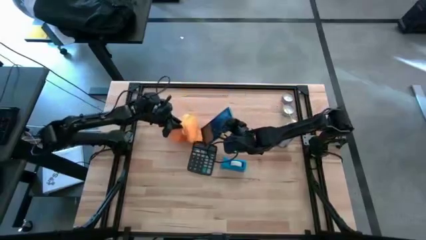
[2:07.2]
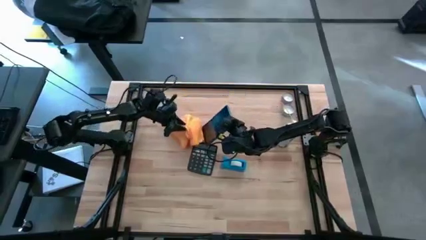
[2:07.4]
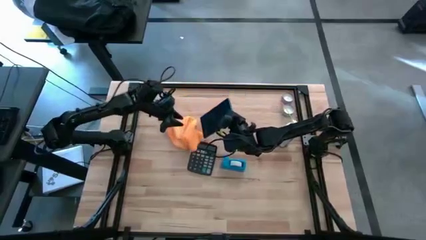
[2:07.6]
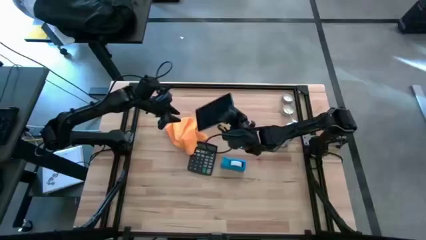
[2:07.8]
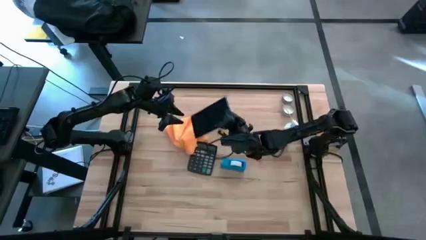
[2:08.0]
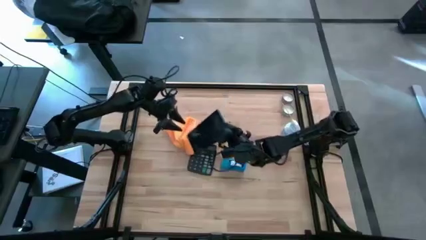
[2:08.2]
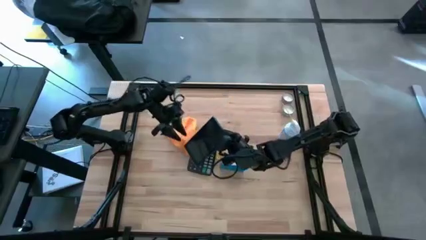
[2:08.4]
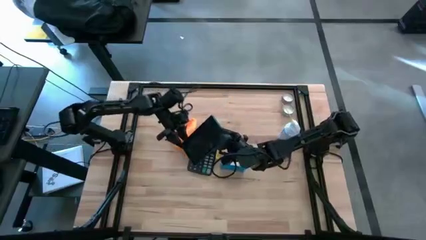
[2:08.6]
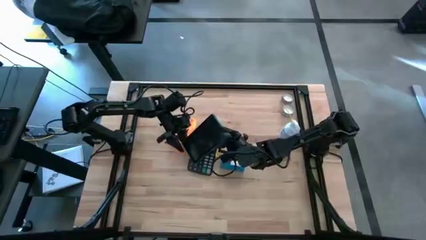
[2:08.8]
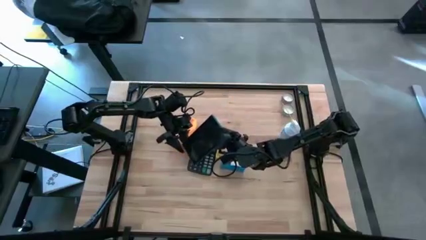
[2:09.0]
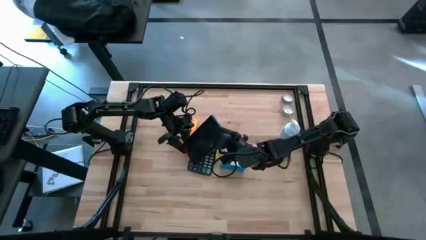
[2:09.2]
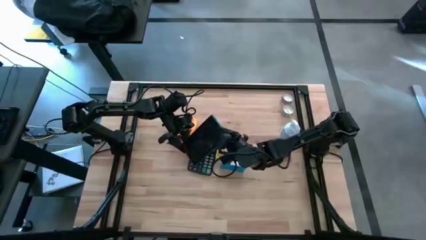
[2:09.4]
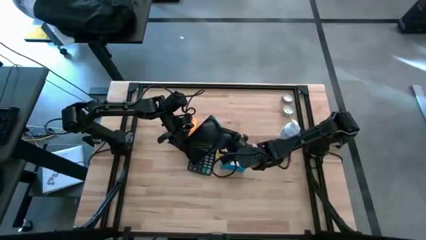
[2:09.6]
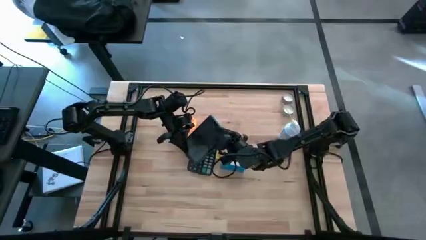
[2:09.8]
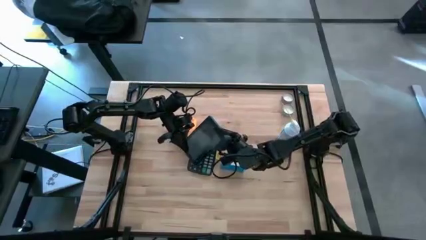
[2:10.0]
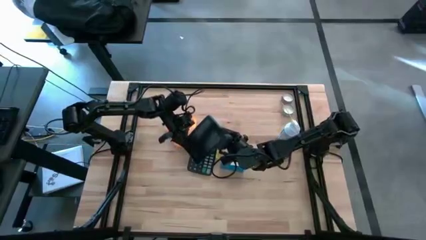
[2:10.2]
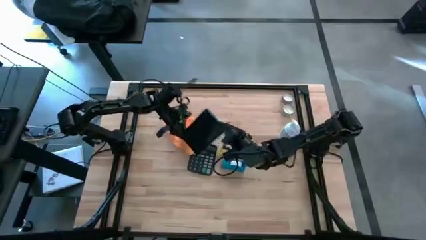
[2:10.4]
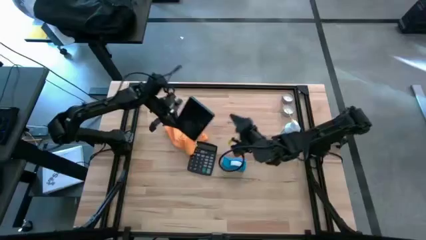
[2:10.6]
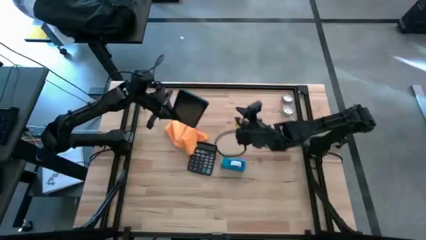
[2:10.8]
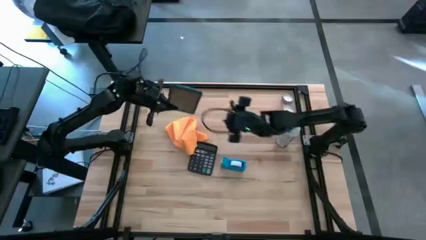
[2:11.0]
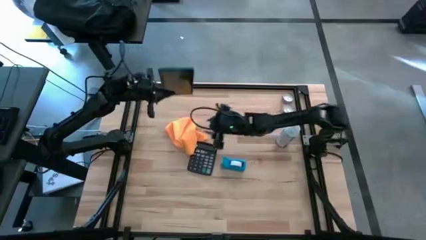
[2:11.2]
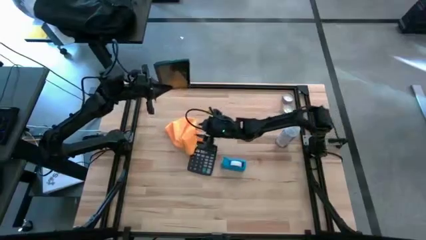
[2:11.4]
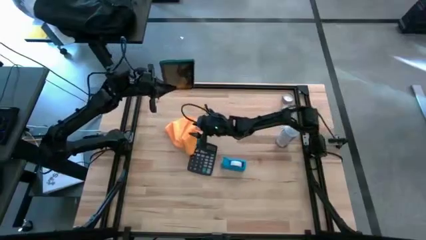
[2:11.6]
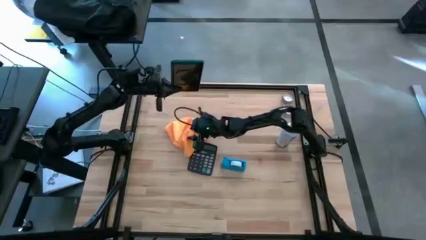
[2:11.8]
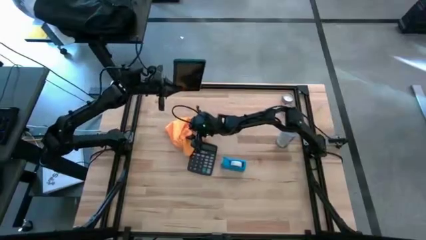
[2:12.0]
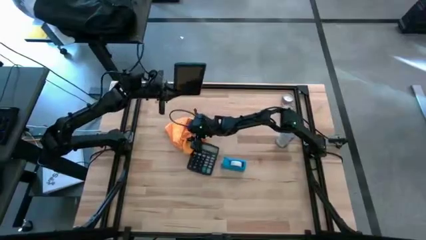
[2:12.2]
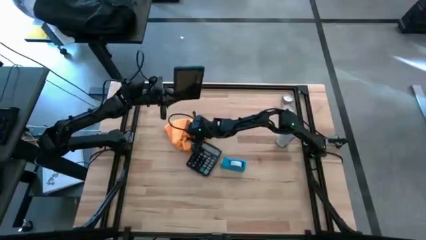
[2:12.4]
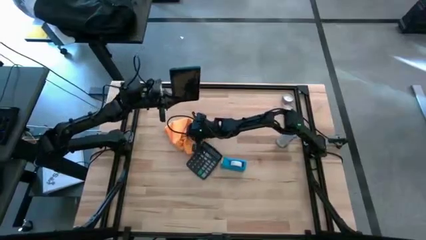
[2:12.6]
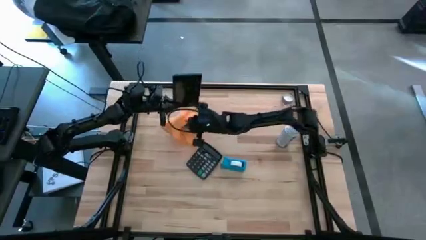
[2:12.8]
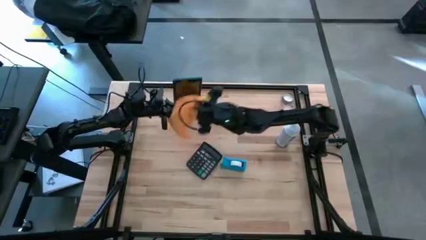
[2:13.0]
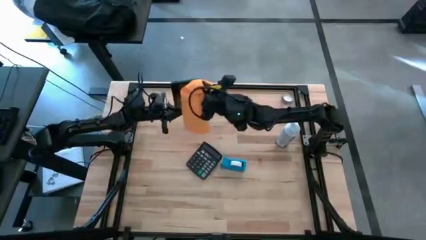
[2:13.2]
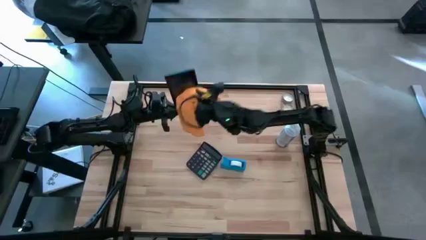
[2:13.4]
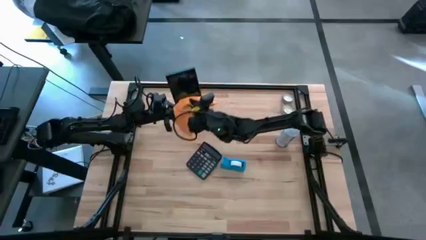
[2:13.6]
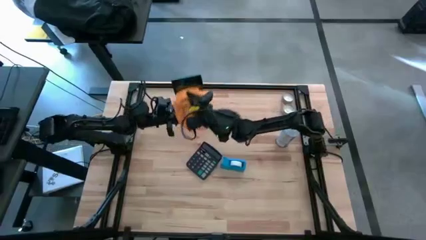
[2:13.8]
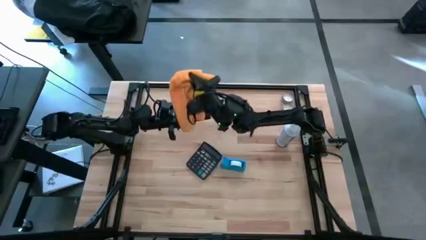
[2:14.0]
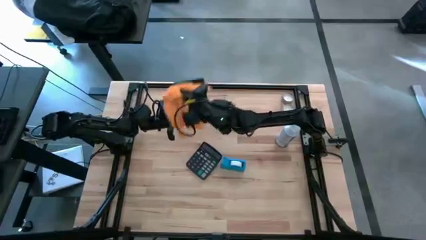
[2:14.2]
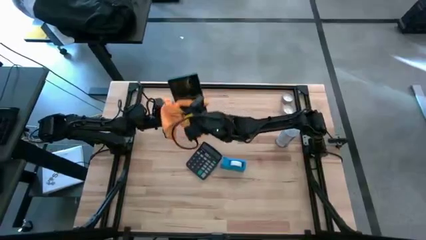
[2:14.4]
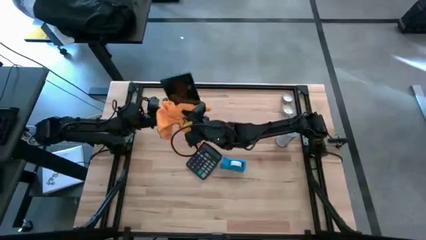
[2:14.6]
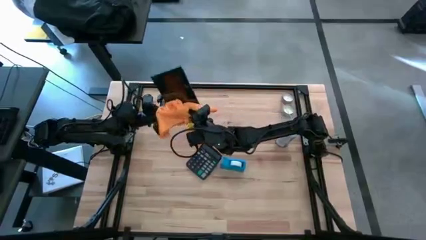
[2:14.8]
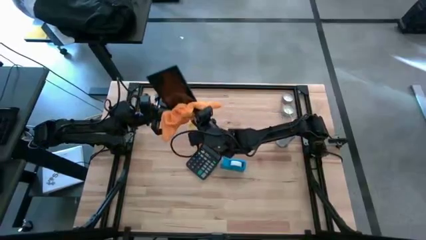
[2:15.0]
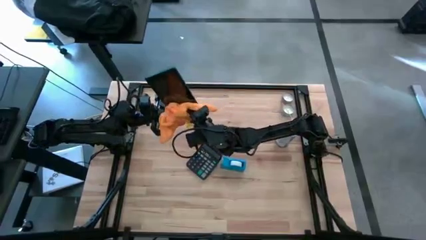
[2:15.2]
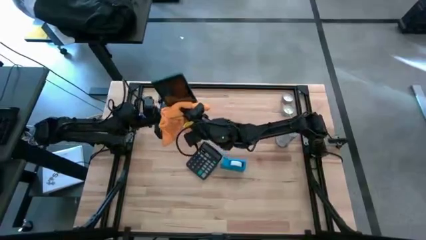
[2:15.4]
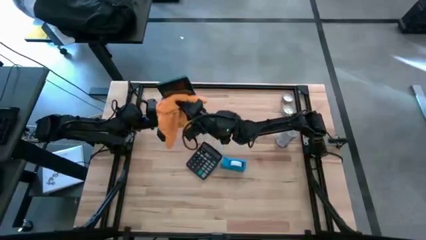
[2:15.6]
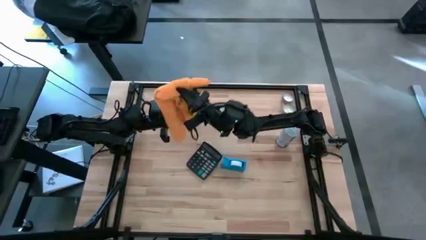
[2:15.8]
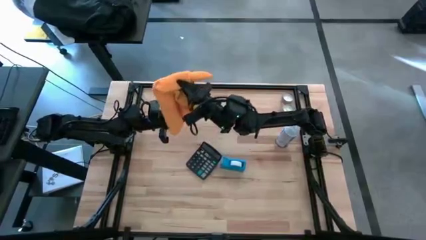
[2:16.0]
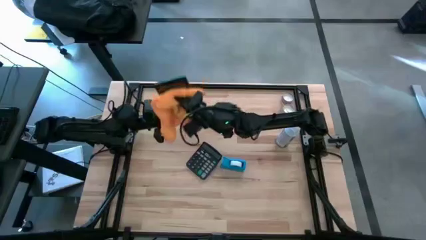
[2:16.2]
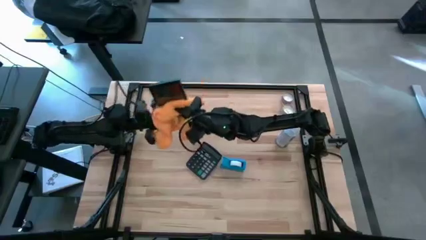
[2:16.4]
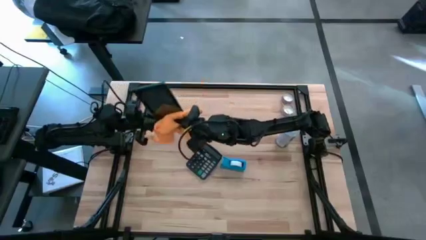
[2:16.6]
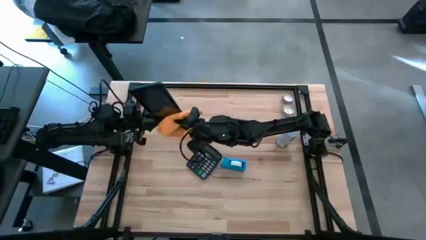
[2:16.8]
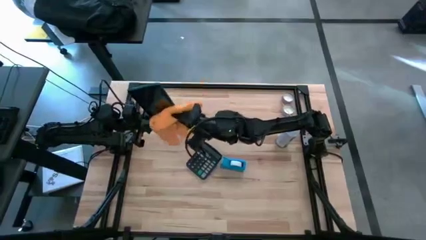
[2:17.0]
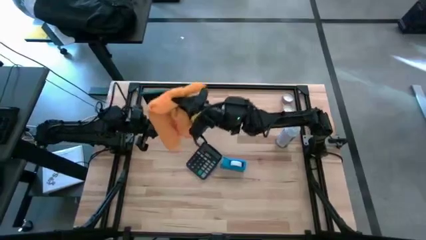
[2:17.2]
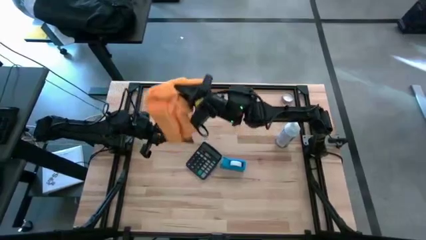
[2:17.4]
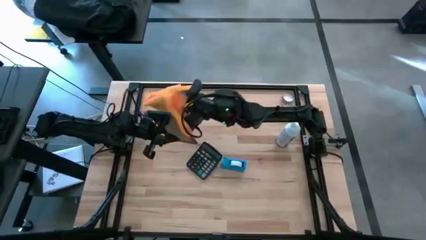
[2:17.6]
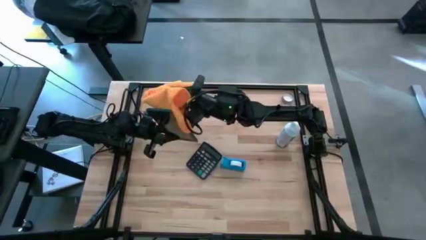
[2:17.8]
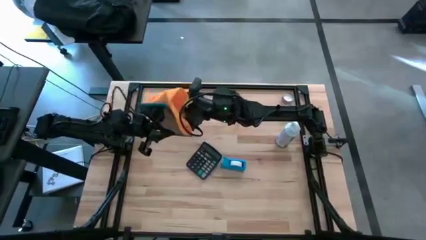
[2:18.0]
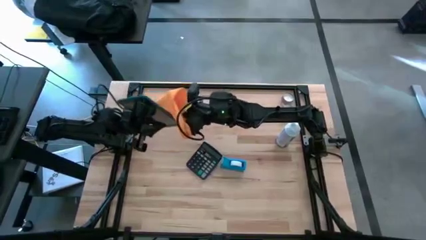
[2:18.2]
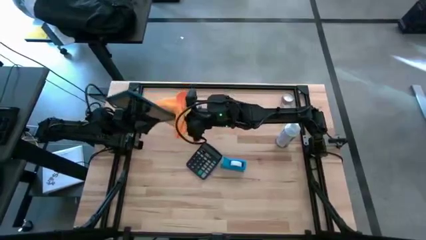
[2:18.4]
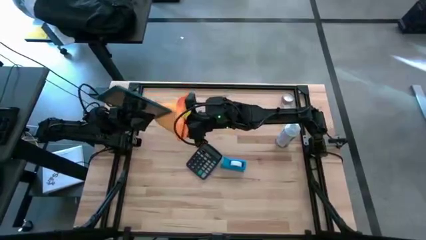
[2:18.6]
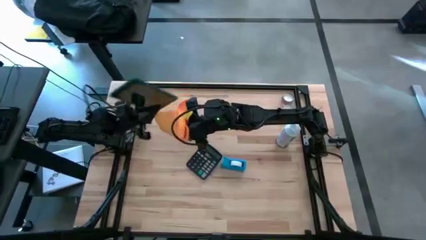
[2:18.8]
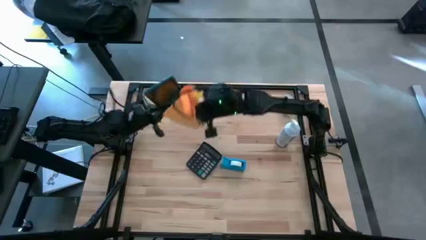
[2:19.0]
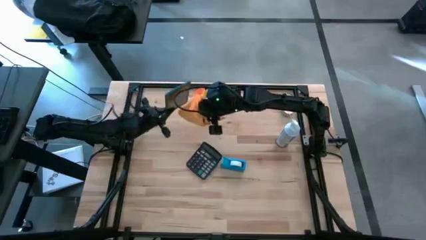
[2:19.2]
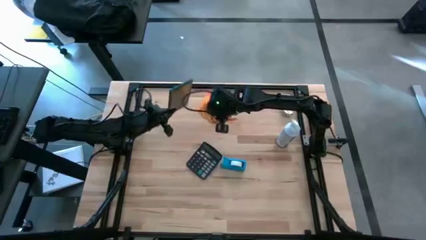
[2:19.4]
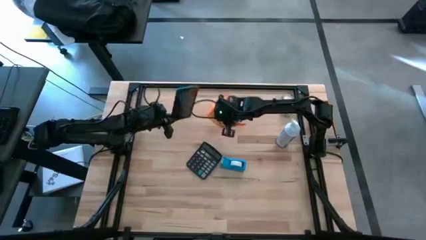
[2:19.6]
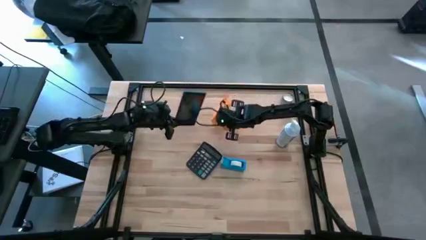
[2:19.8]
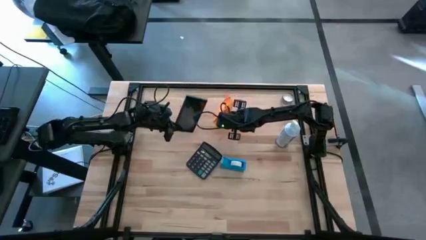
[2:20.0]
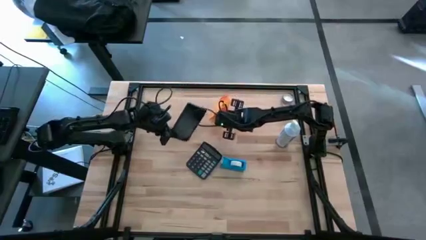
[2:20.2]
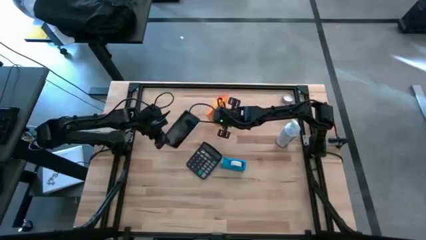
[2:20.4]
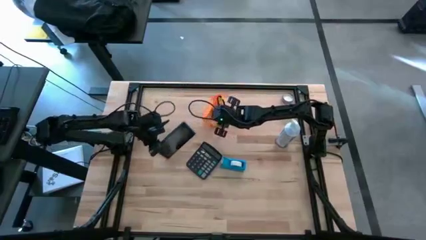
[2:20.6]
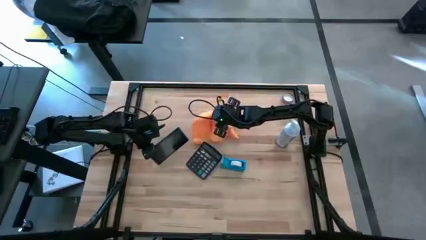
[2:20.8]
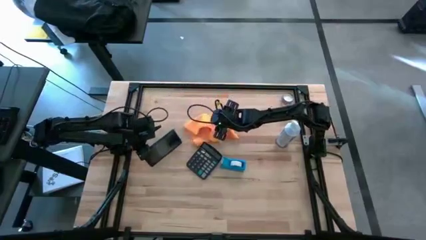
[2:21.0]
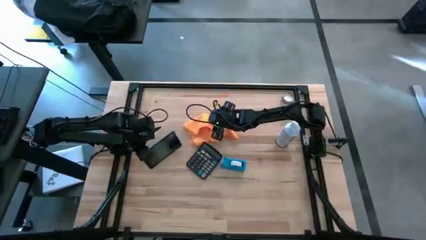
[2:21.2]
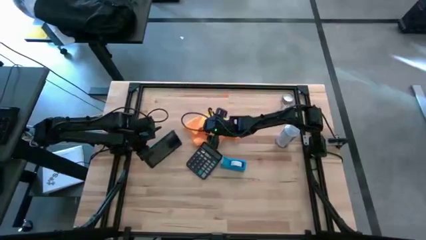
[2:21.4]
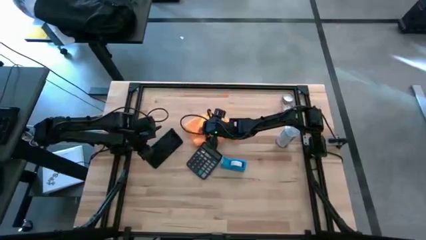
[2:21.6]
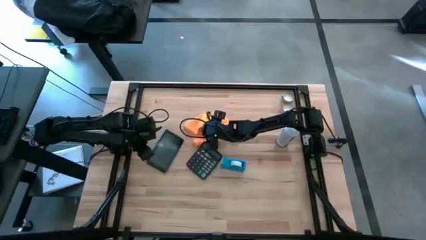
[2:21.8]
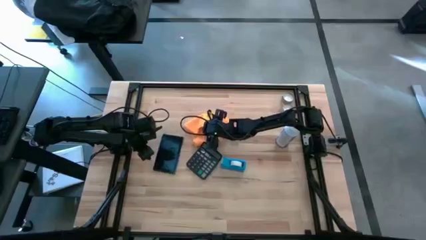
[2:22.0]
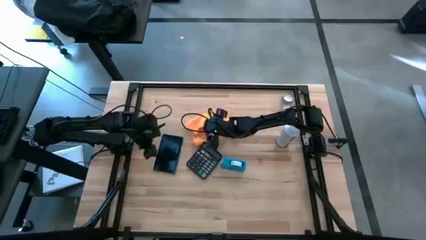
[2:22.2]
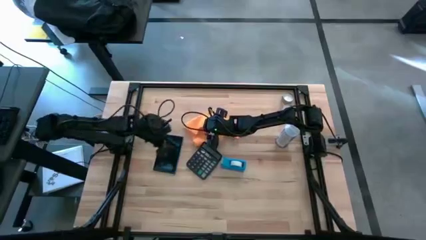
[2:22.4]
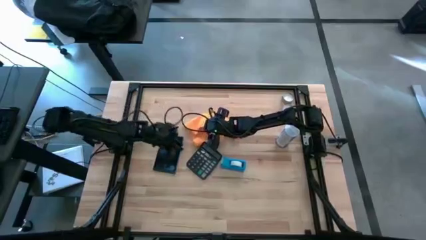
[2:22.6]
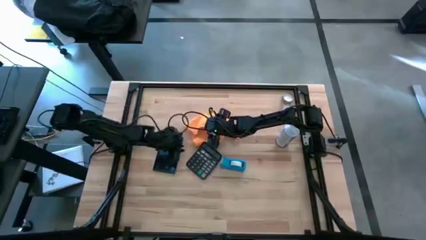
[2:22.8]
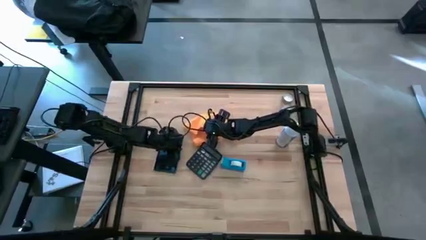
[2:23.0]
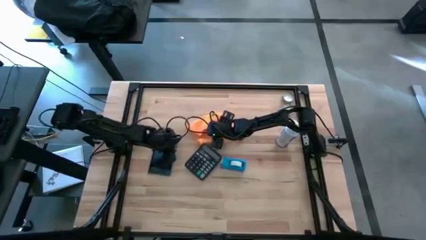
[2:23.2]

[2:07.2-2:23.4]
Task: Apply microfiber cloth
Wipe the front of the cellphone with the microfiber cloth
